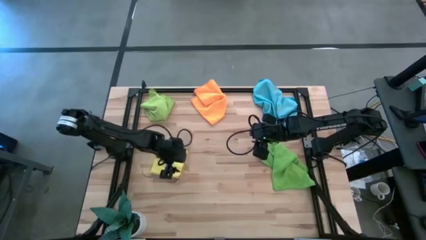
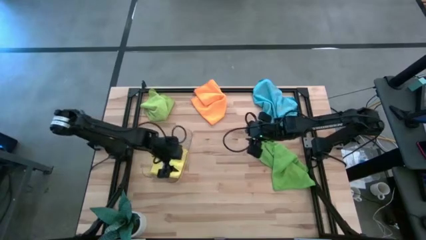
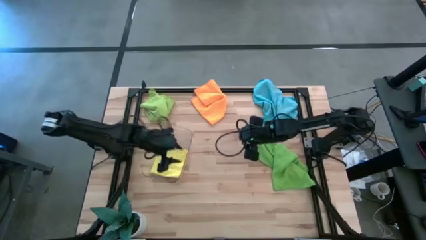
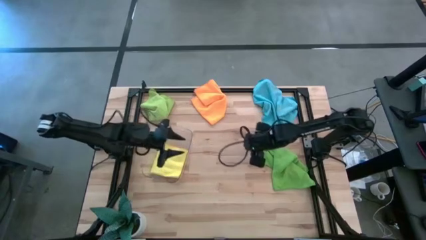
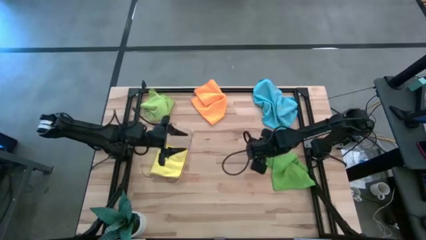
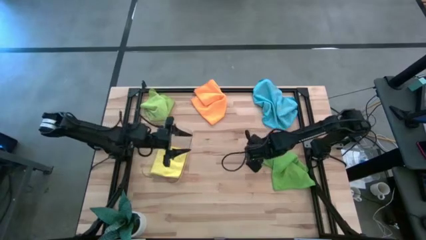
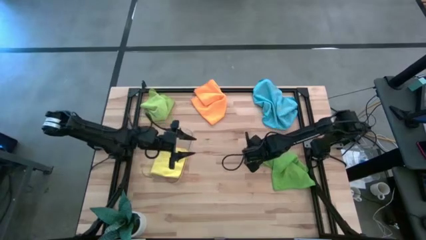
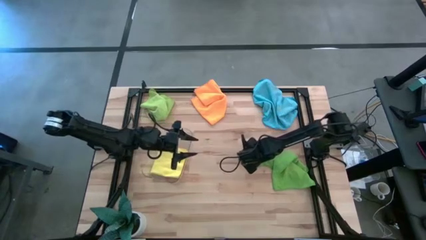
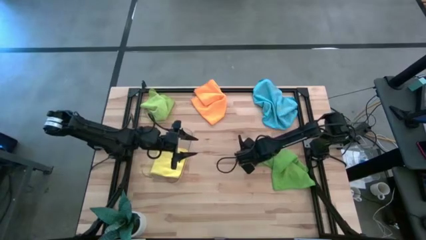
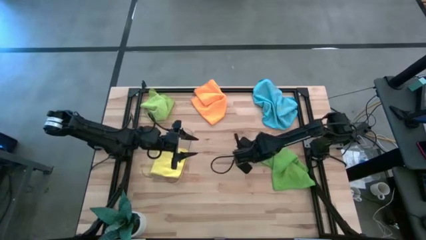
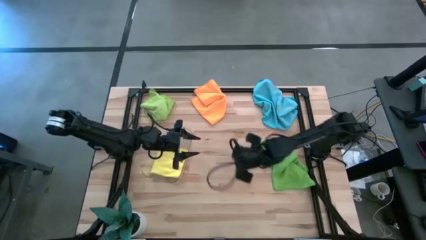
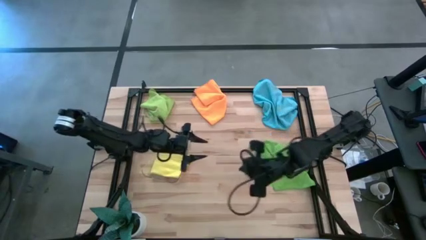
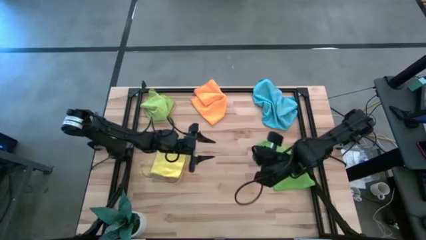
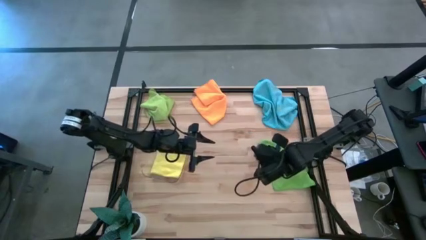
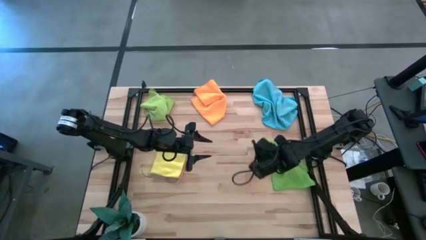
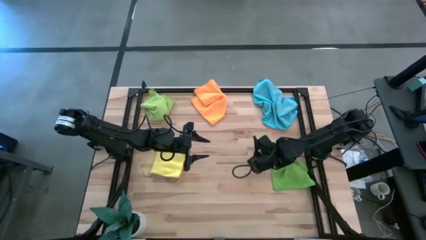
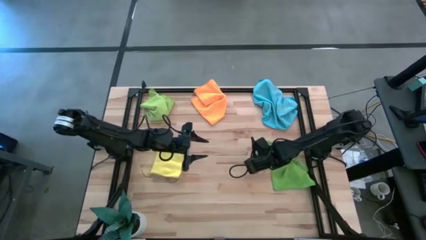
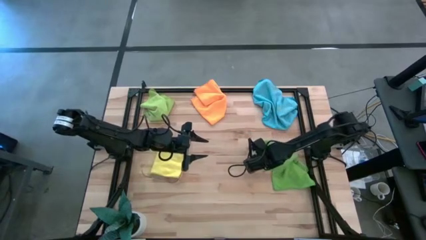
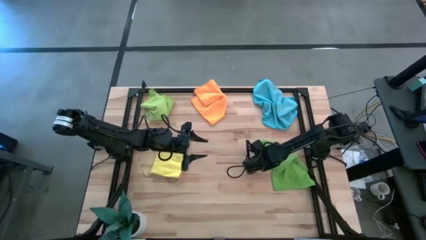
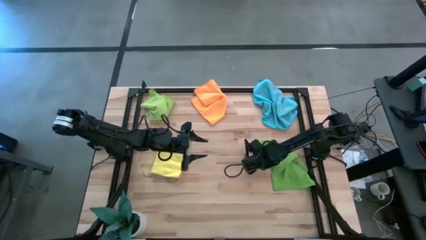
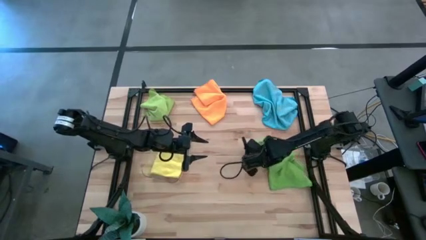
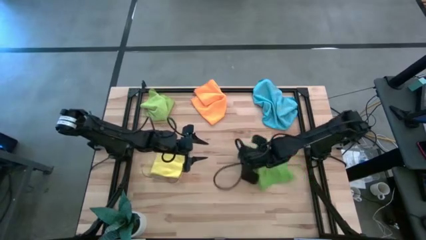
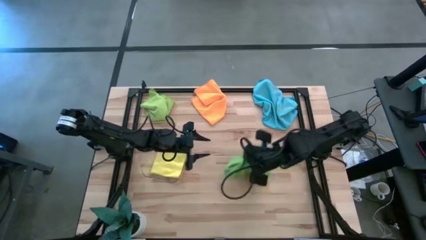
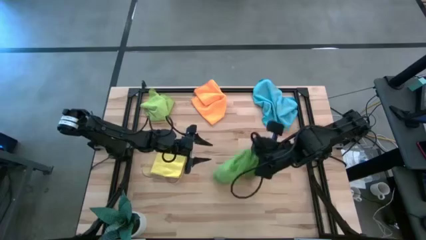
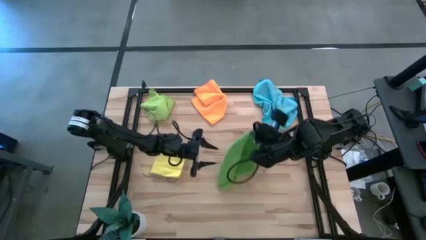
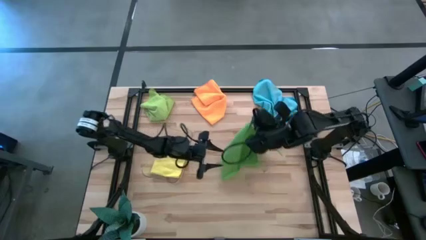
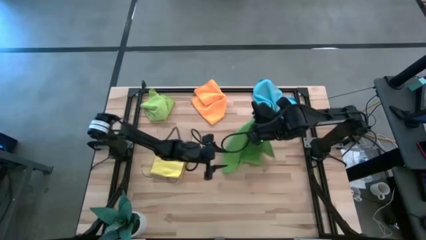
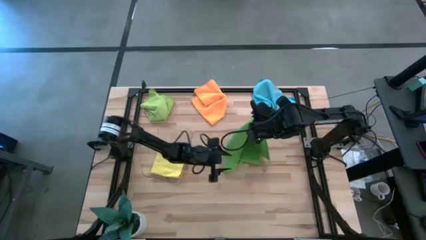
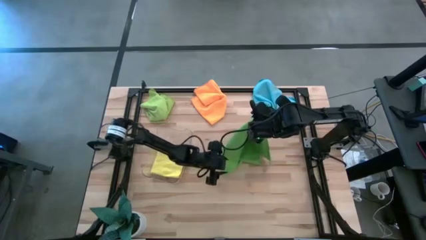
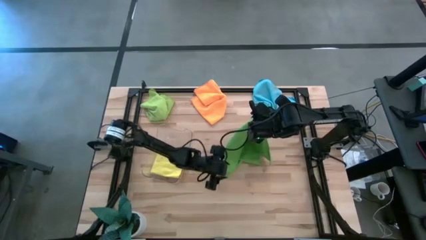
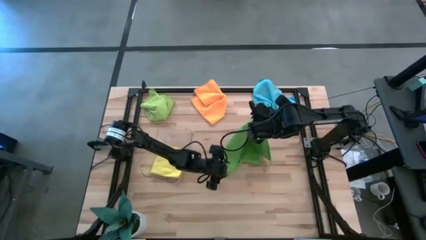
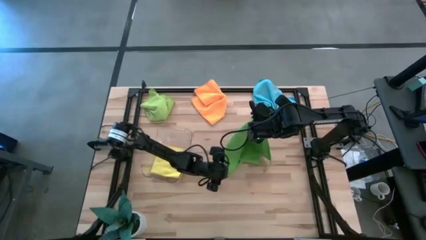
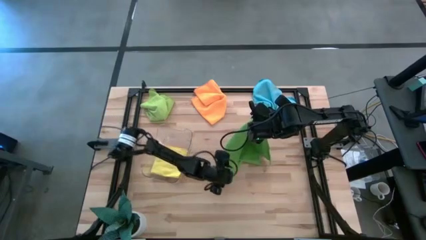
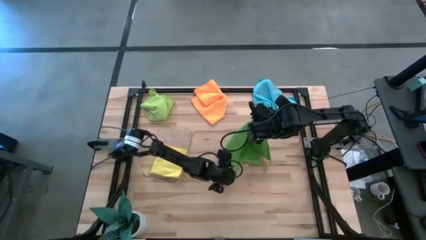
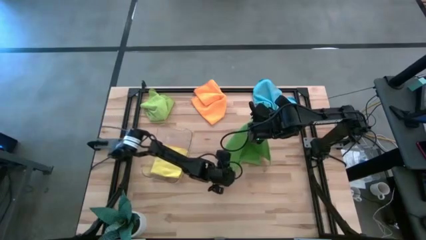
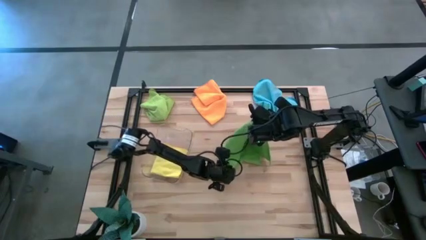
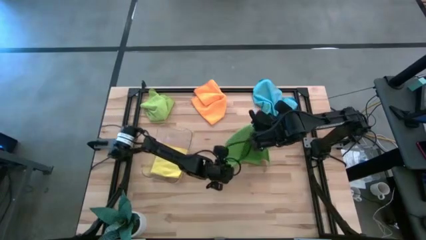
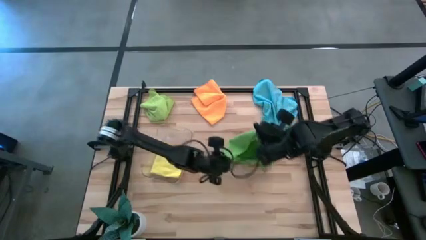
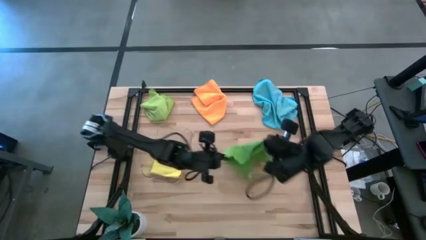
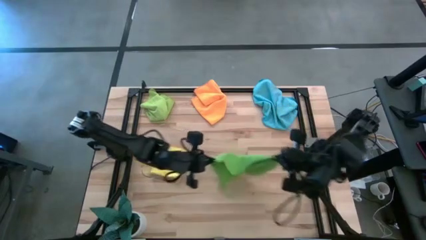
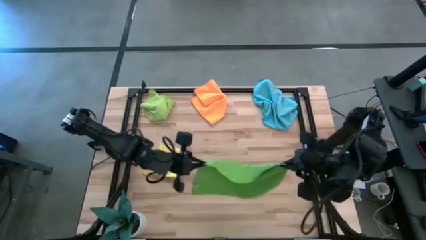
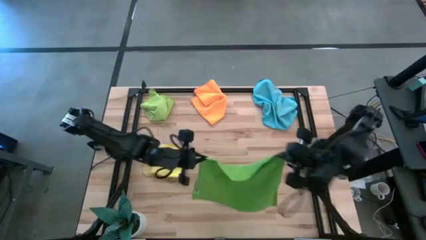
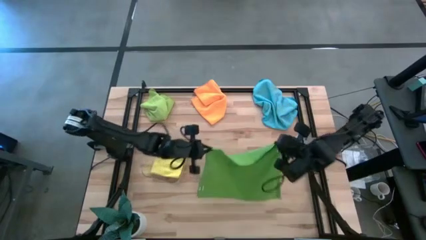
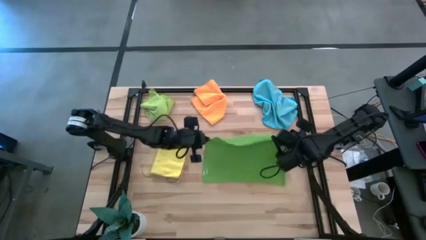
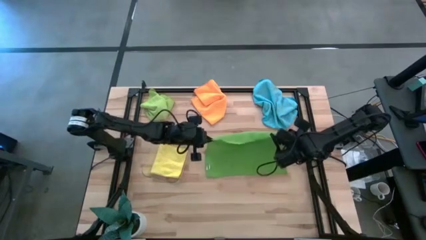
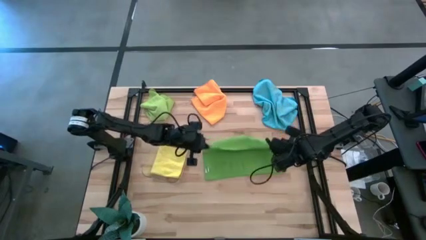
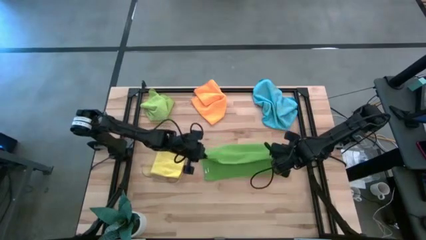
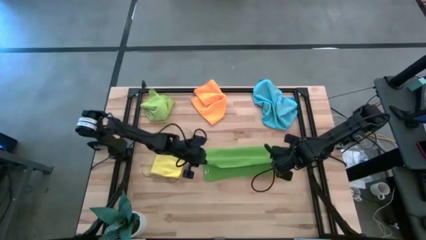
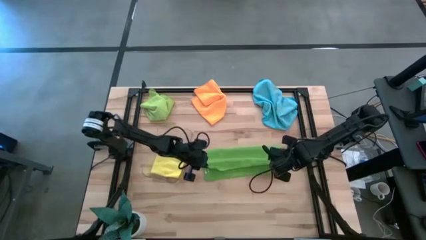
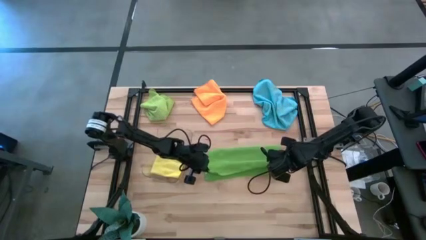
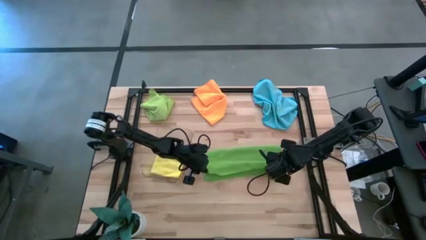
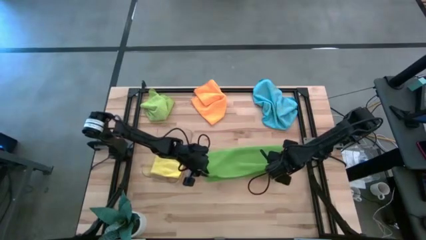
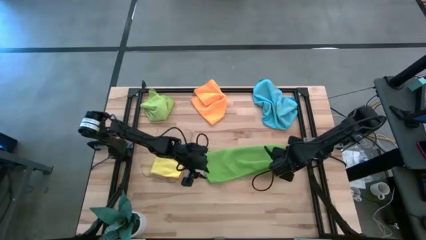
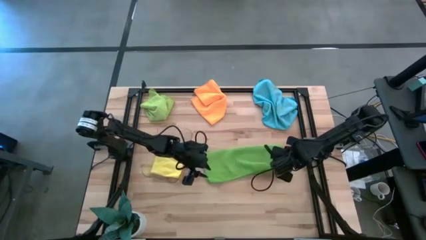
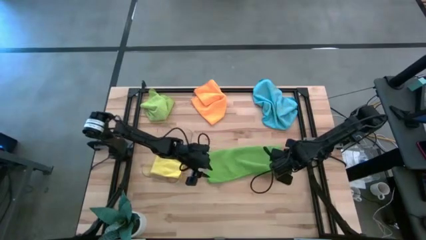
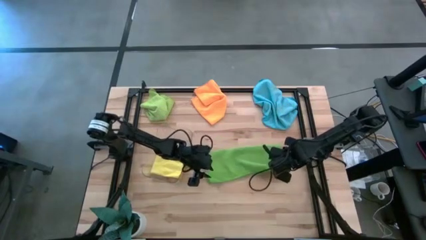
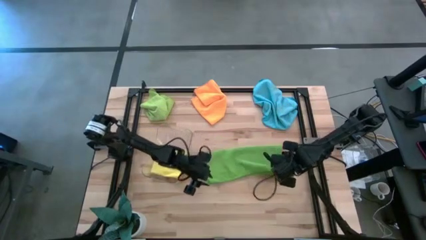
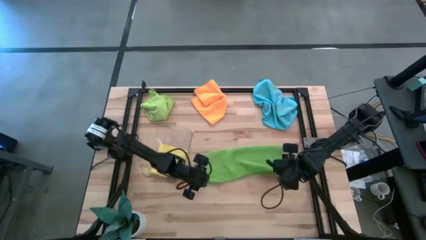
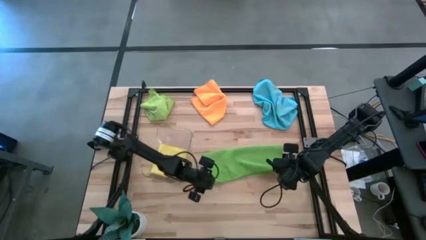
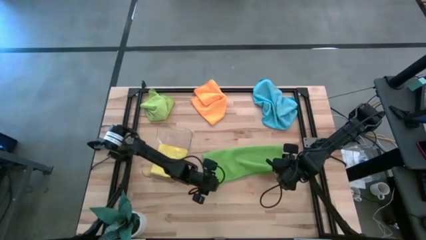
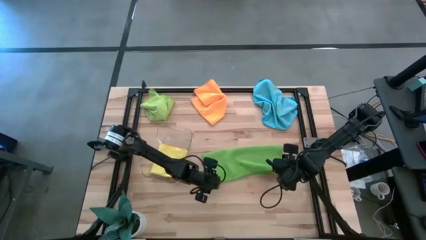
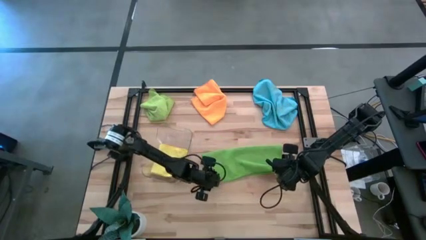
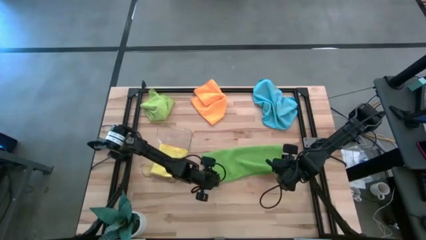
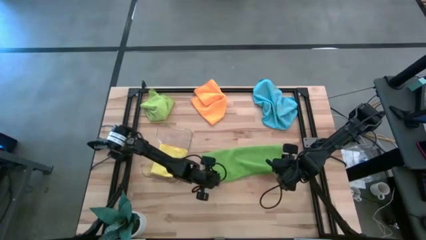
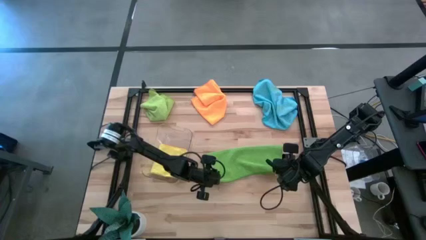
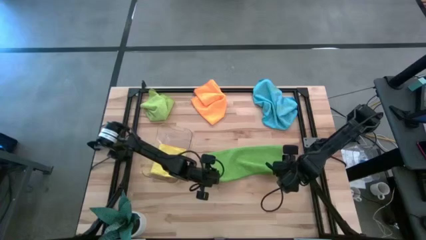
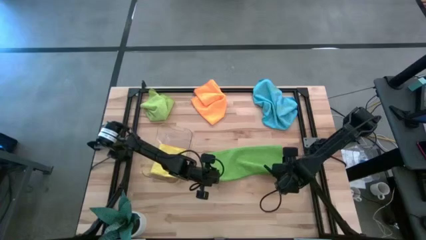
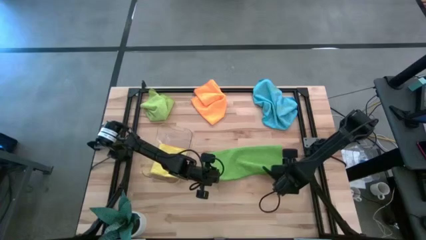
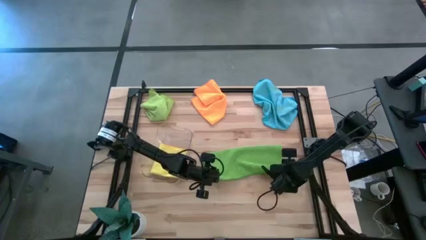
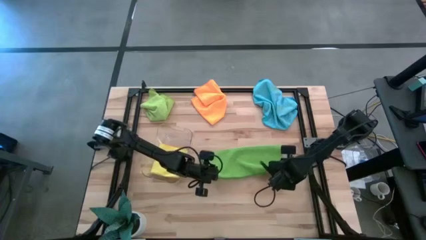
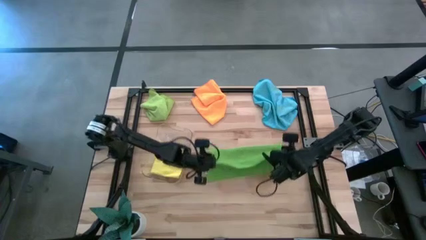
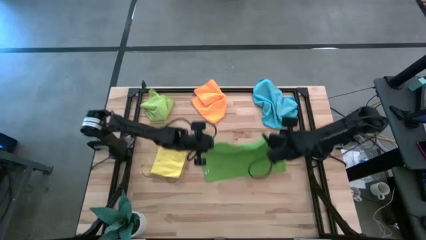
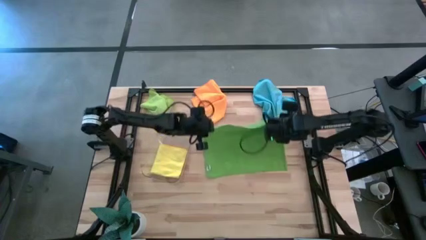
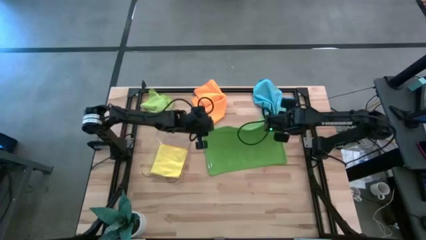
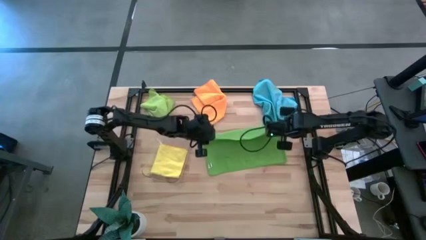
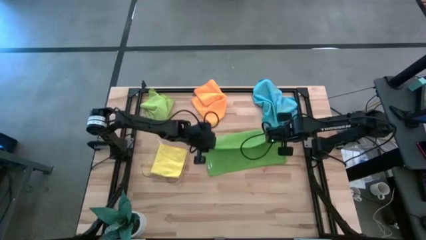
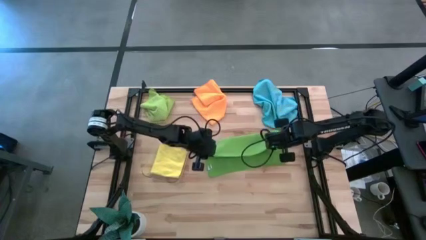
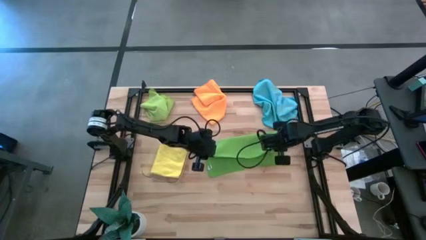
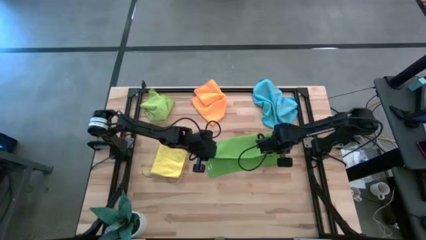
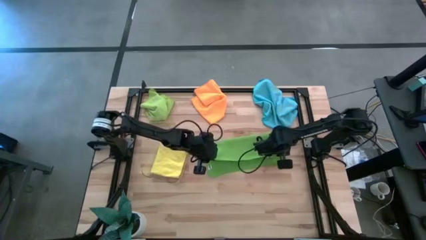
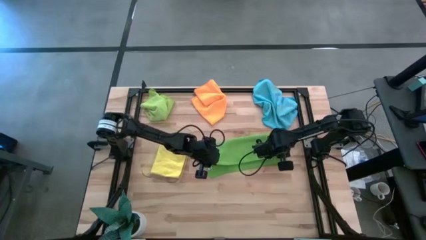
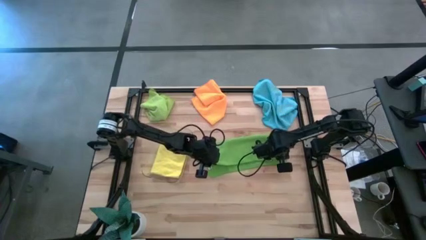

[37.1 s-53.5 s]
Task: Fold microfiber towels
Fold the right green microfiber towel on the table
